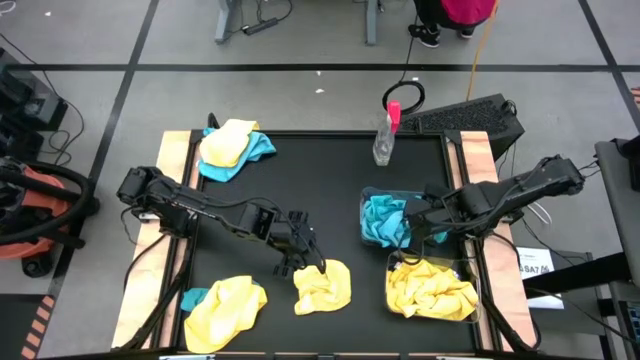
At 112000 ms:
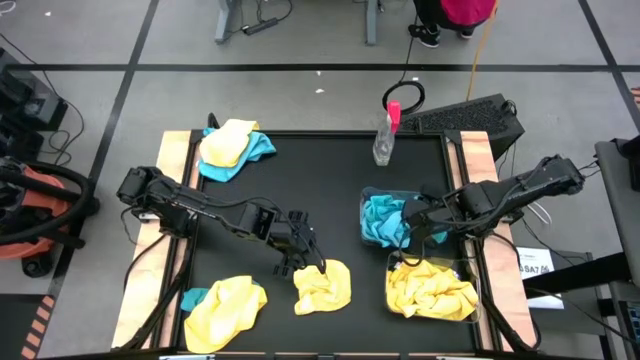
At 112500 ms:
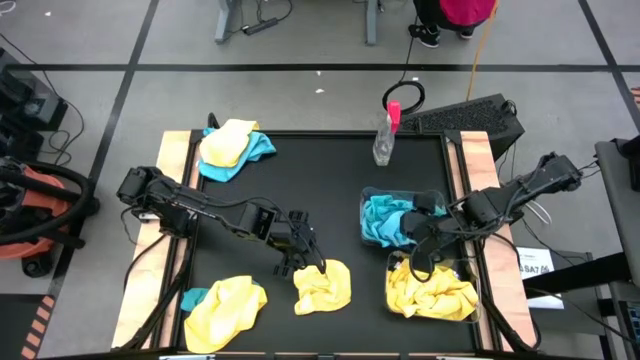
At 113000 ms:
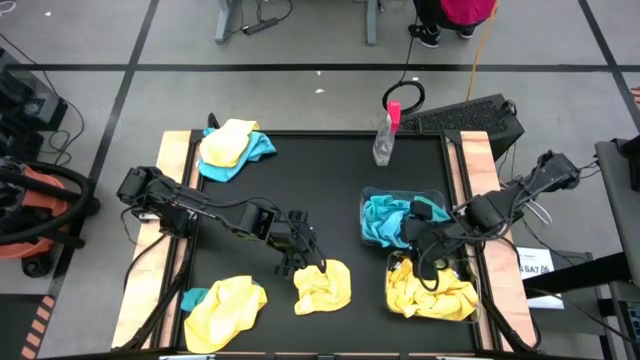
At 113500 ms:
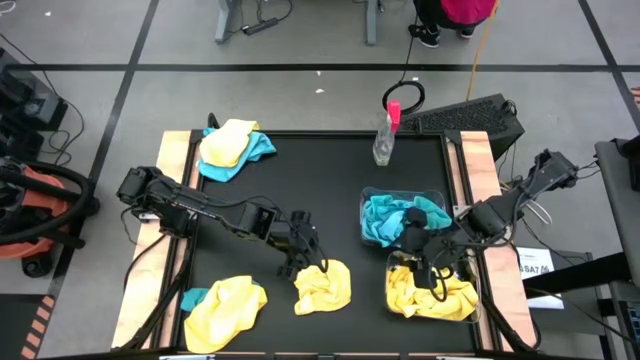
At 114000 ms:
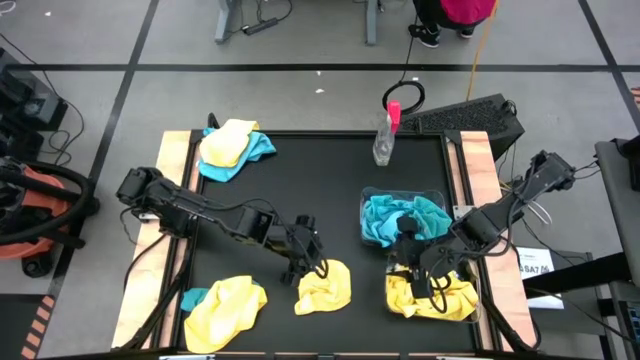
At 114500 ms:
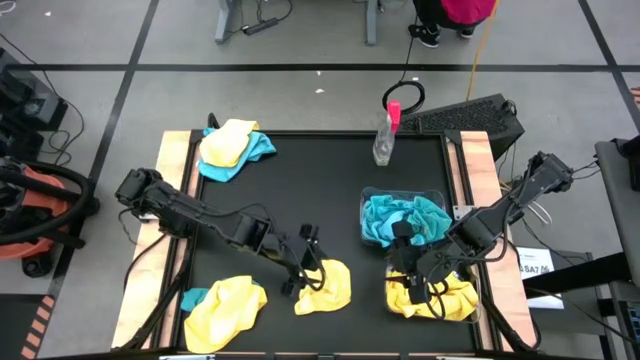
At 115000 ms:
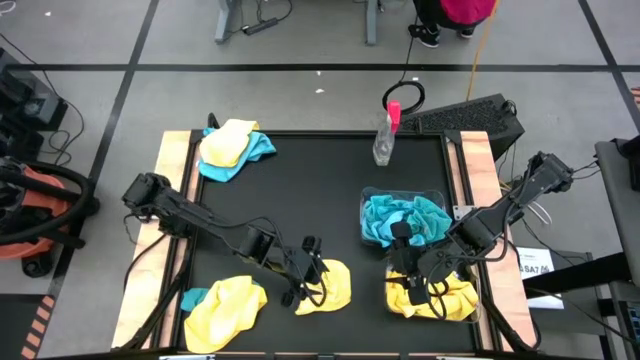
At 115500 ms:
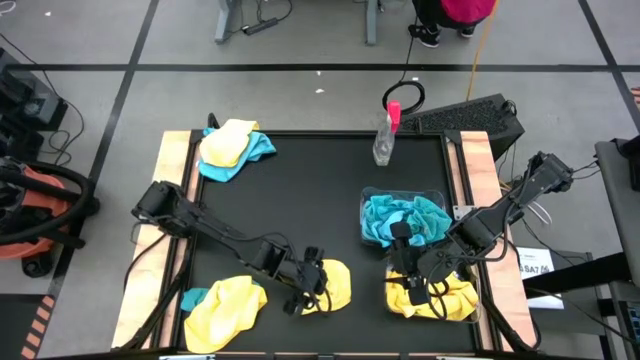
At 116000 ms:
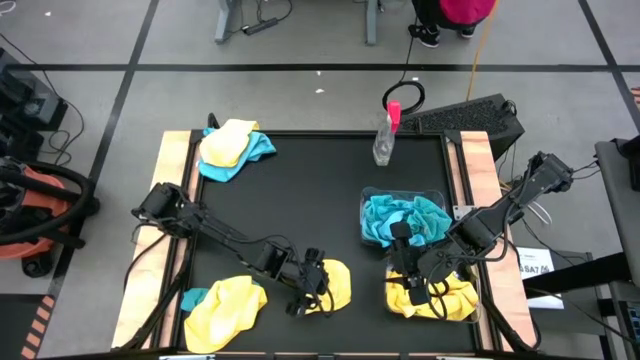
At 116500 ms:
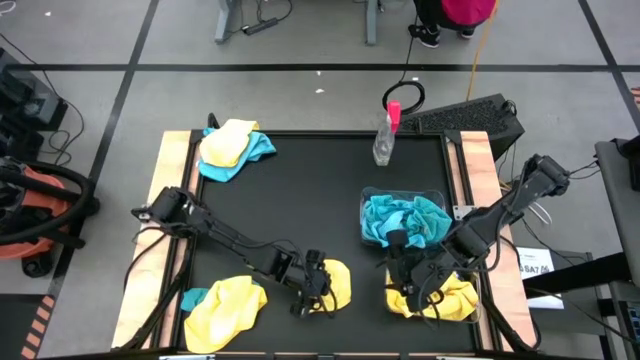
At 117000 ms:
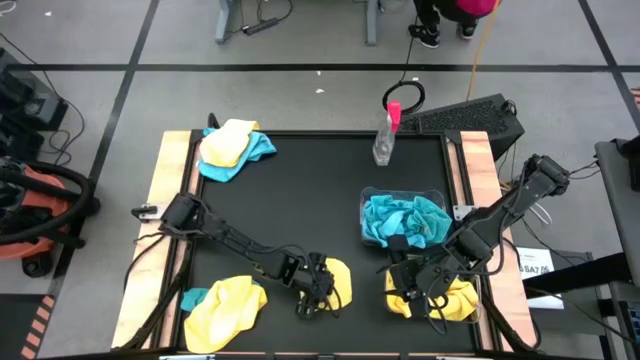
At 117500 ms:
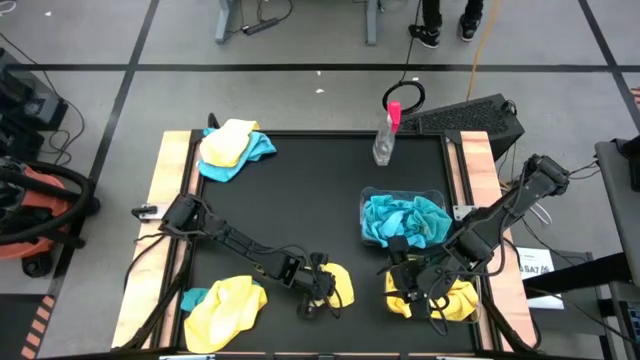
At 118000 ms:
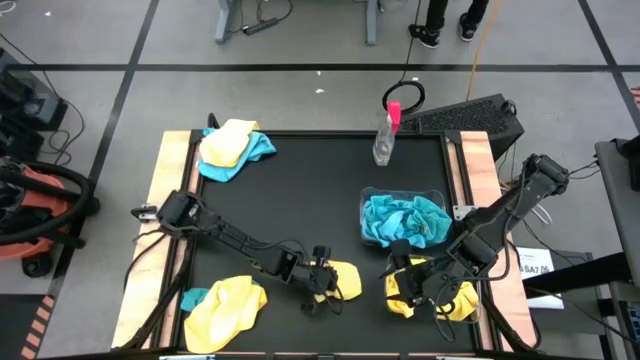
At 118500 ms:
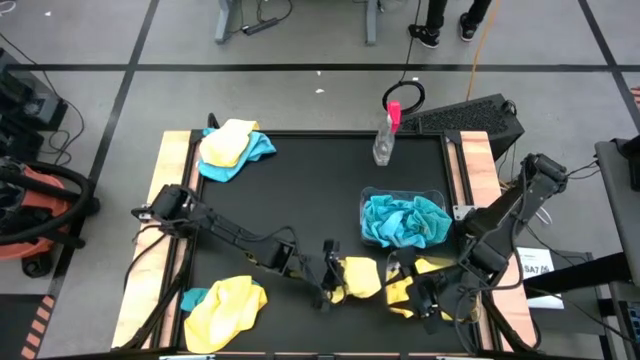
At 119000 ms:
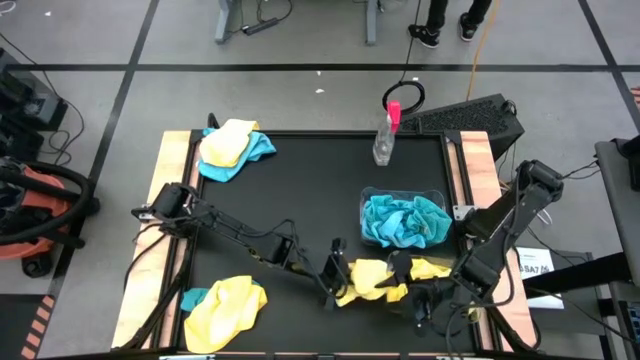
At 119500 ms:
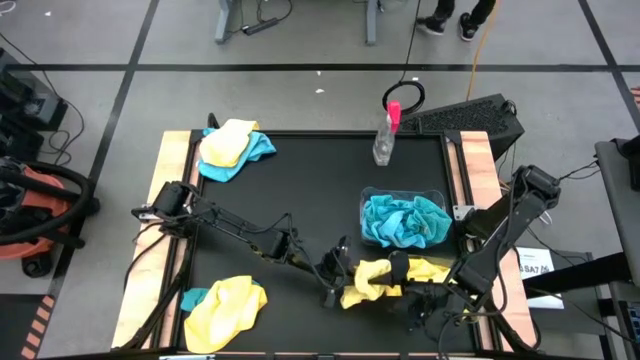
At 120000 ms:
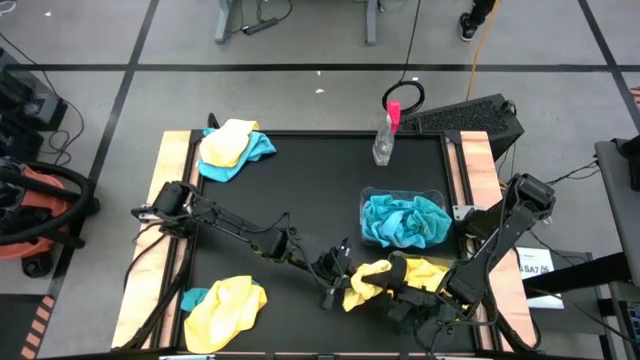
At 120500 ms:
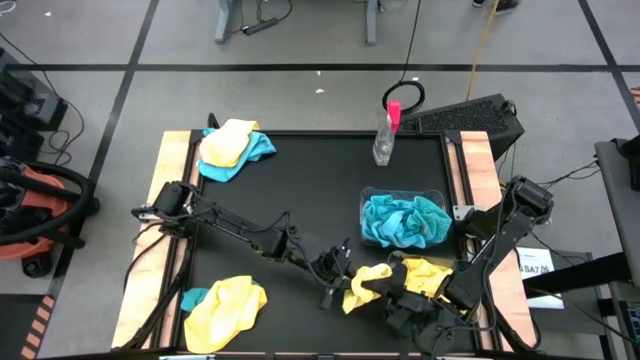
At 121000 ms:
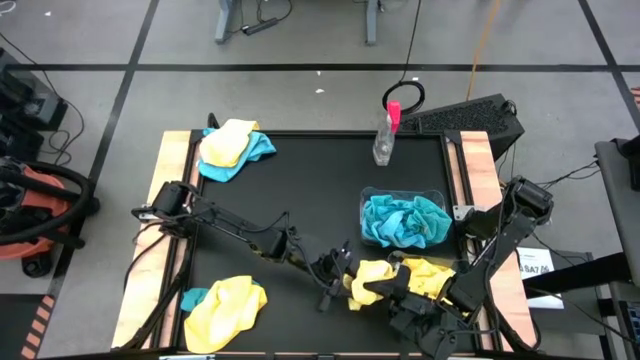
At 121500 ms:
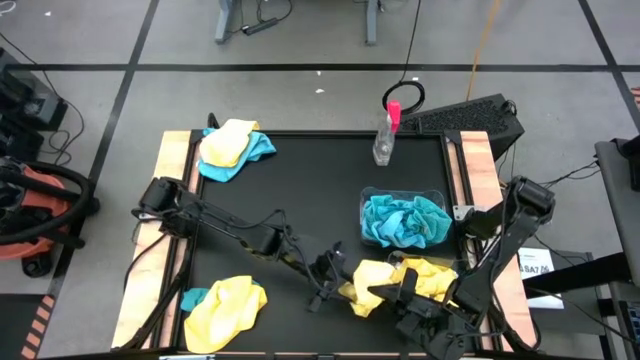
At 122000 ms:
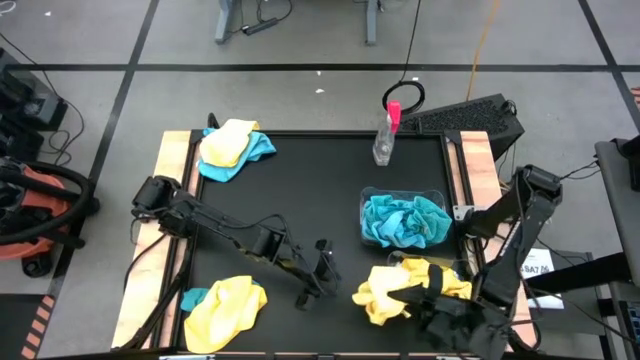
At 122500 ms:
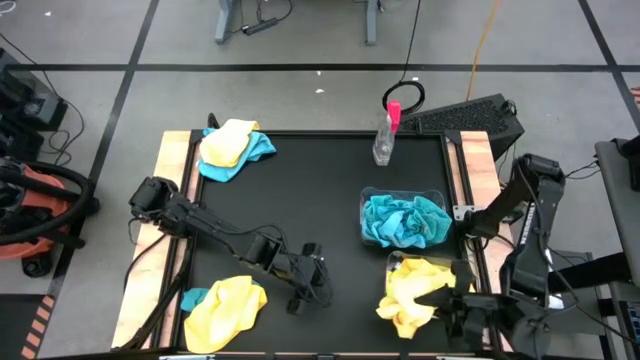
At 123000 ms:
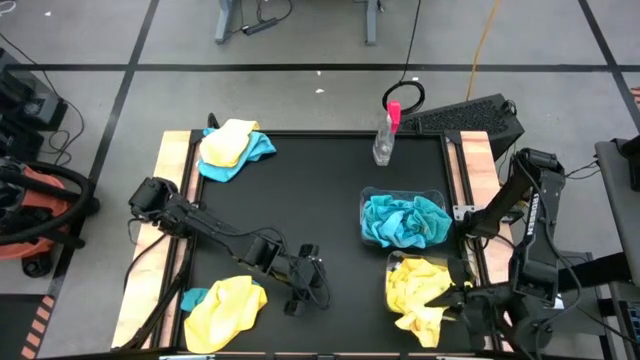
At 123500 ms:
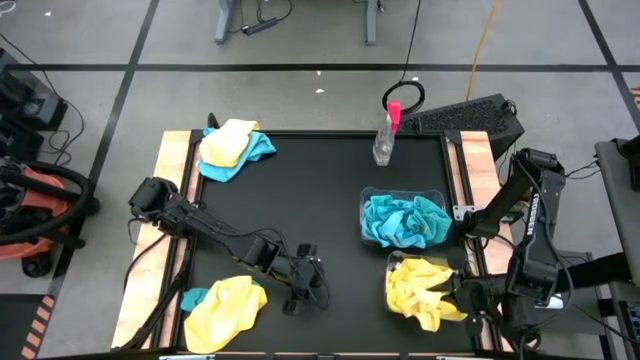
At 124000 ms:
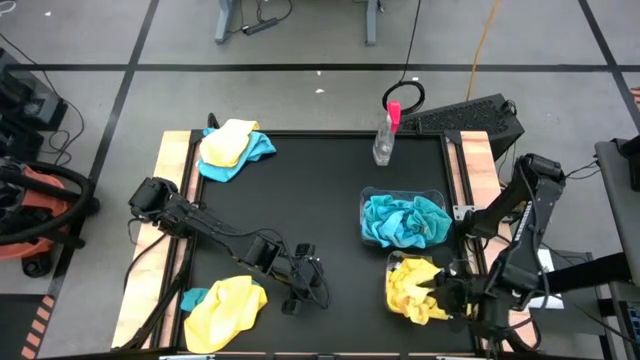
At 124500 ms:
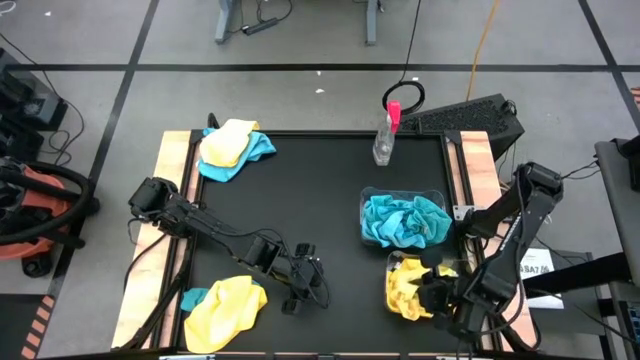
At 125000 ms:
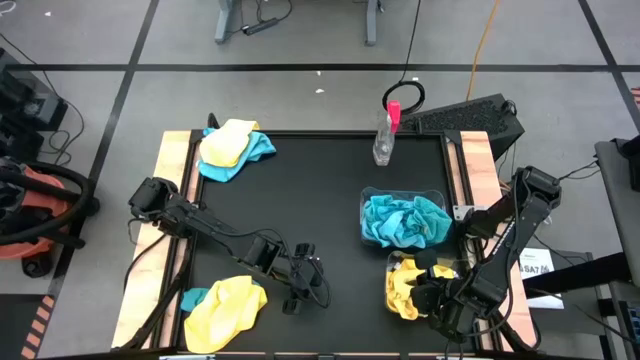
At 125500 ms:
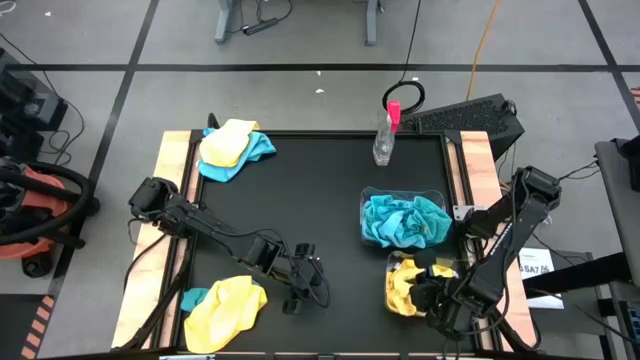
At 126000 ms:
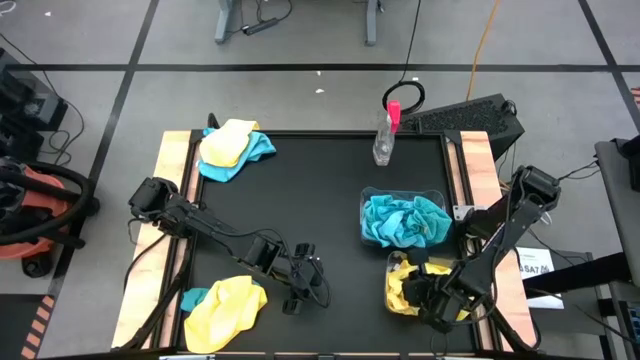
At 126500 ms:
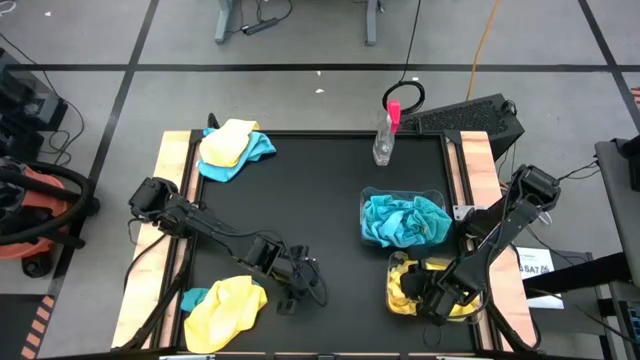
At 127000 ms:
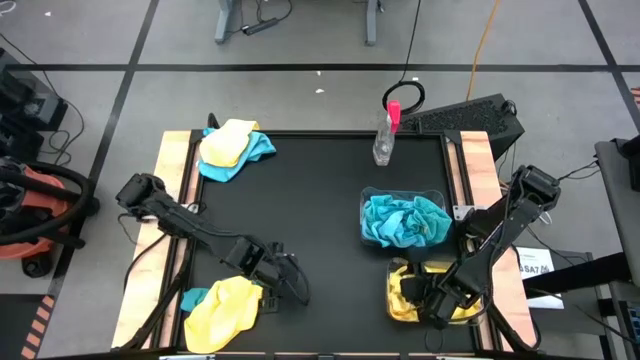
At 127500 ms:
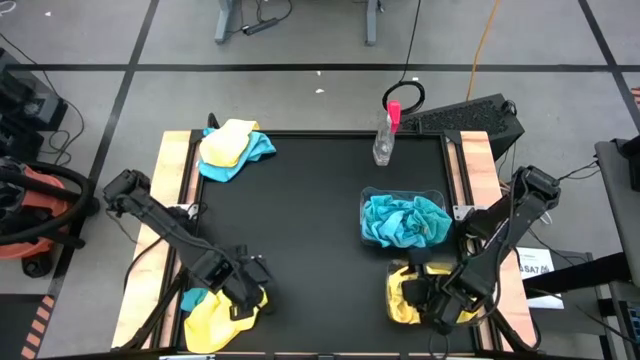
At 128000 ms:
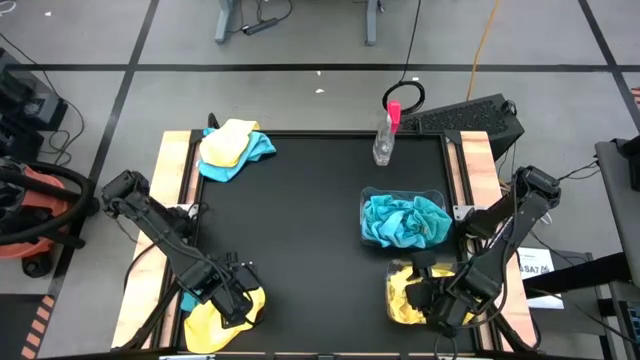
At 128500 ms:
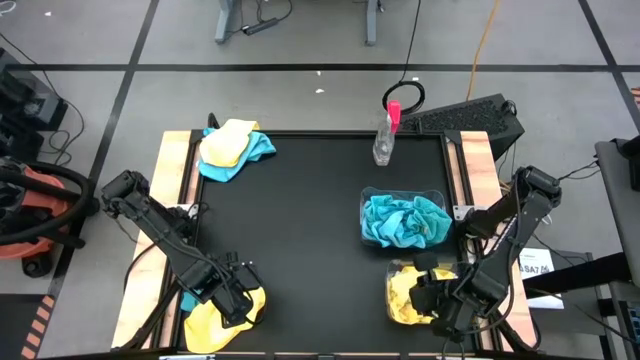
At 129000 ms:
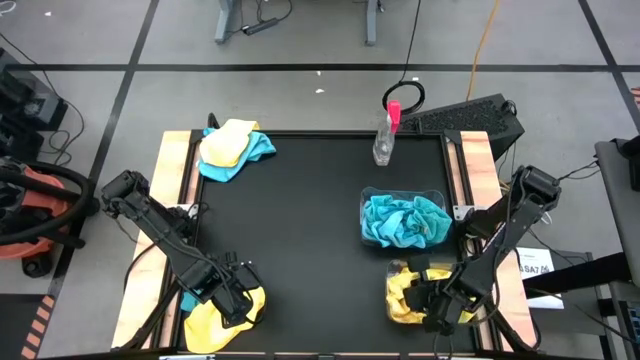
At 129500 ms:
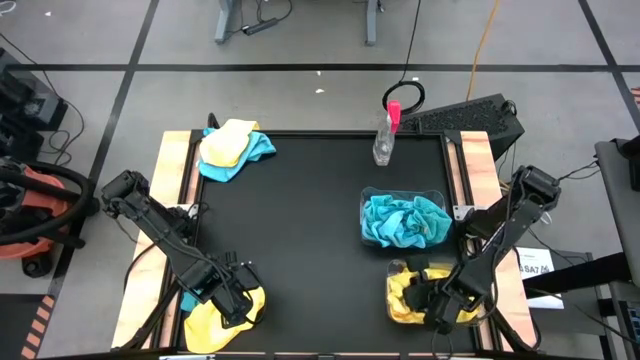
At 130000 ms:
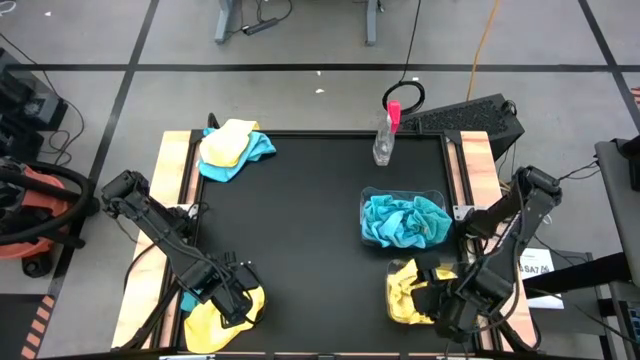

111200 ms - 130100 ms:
Task: Sort microfiber towel by color & place in baskets
Put the yellow towel into the bottom transparent bin

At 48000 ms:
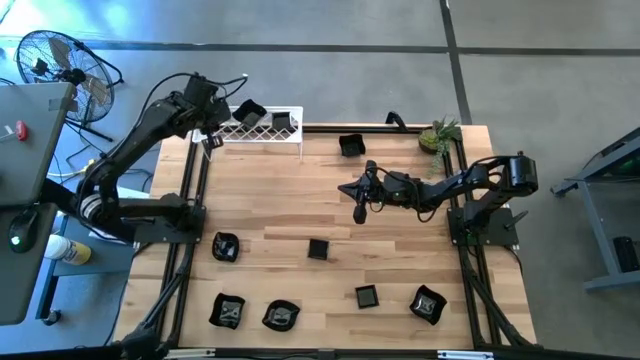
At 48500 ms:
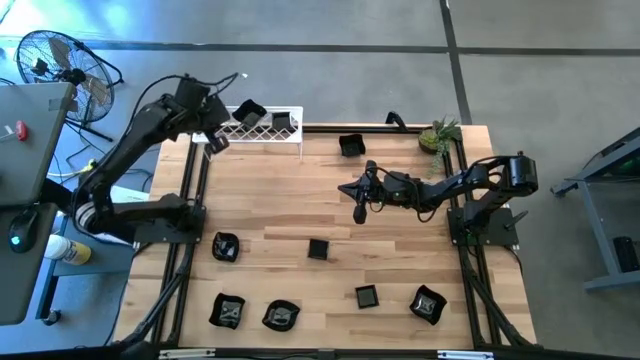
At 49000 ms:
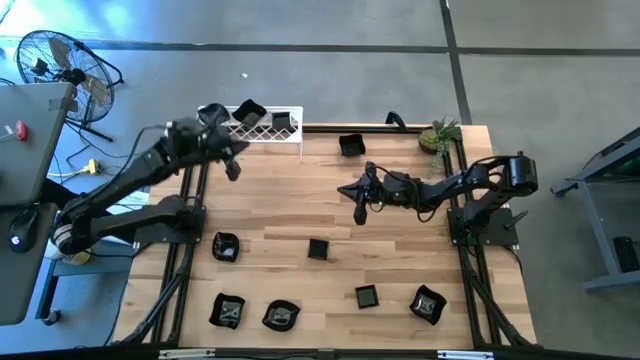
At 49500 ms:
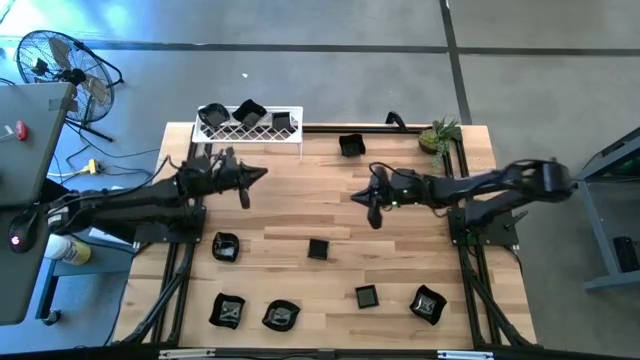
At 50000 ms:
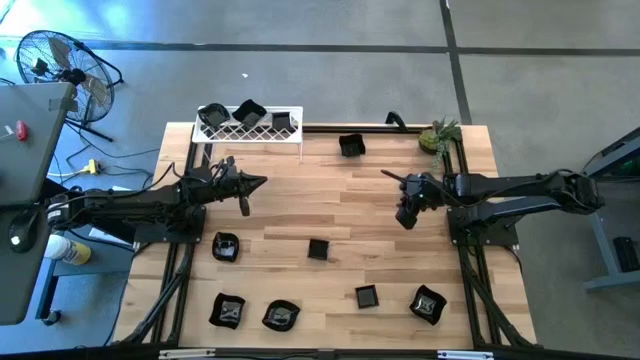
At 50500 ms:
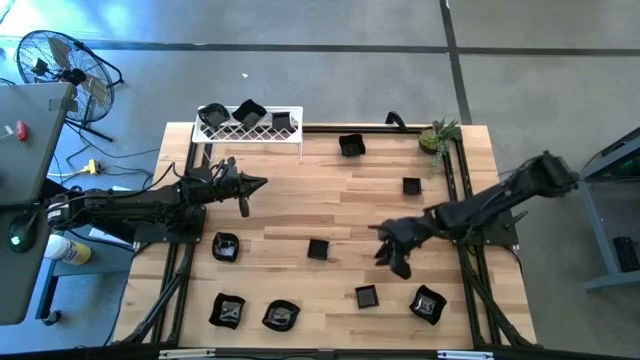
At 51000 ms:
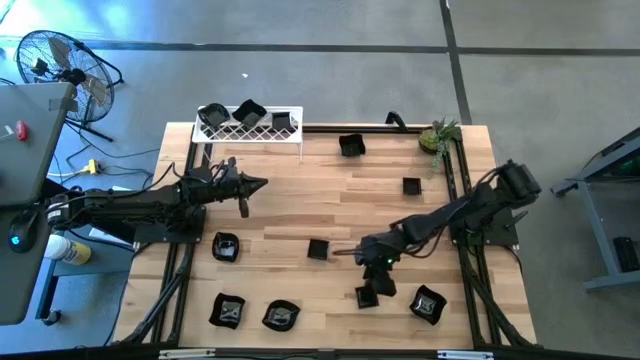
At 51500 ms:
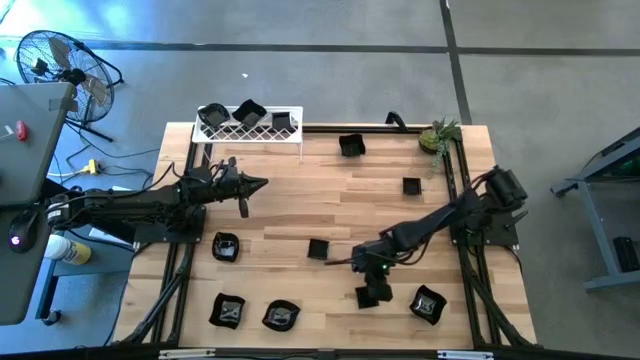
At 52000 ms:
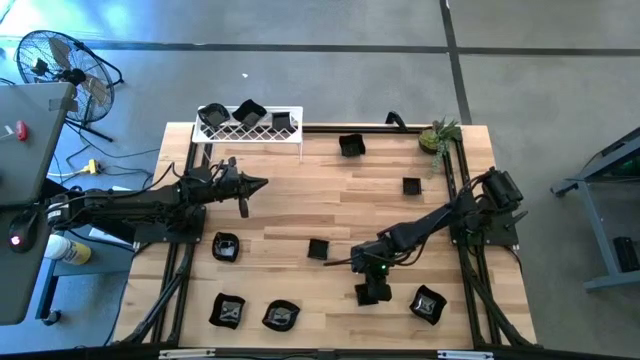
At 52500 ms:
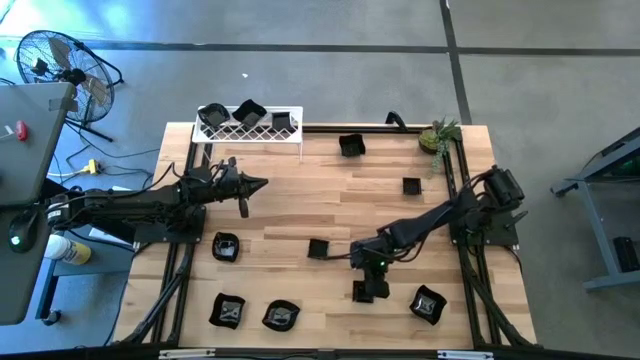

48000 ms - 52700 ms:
Task: Pick & Place Mini shaped plates
Stack the black square plate on top of the black square plate on the shelf
